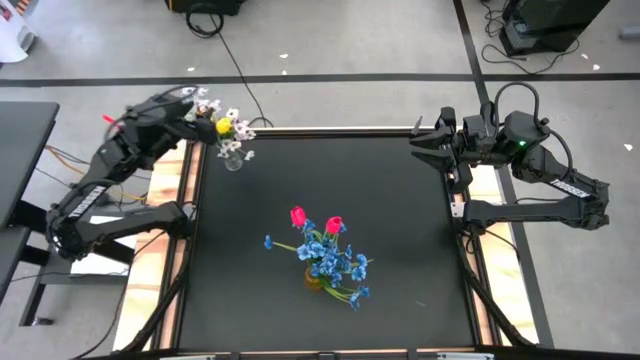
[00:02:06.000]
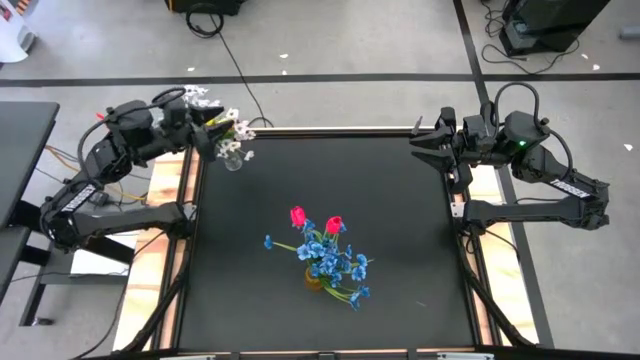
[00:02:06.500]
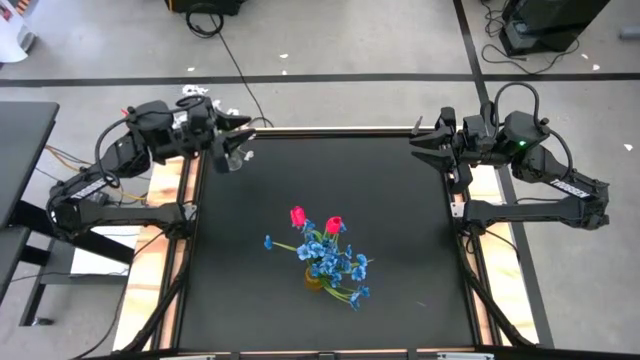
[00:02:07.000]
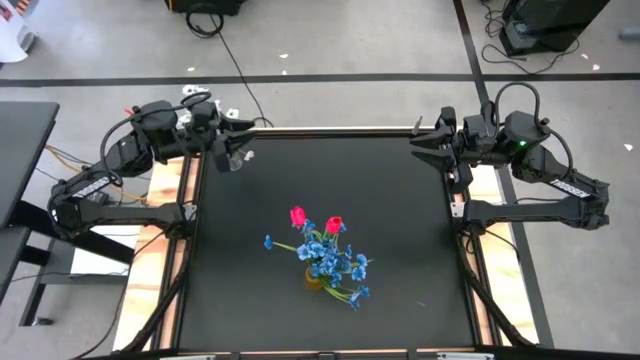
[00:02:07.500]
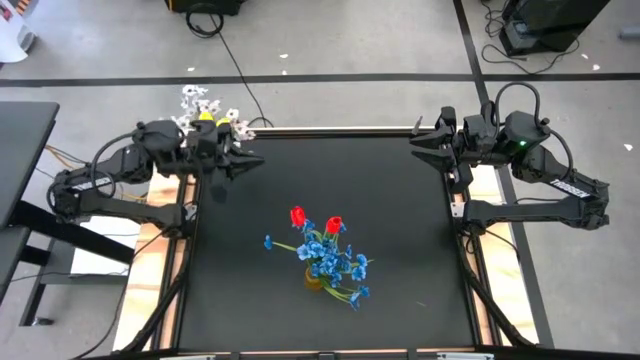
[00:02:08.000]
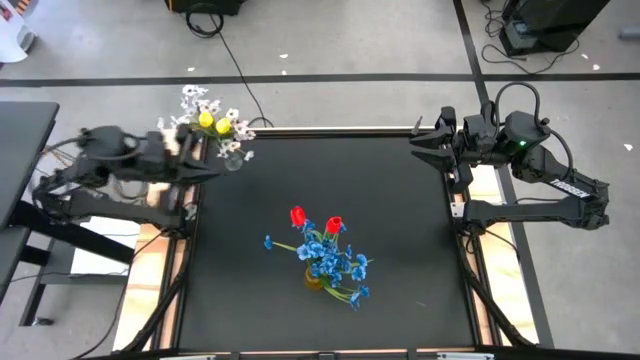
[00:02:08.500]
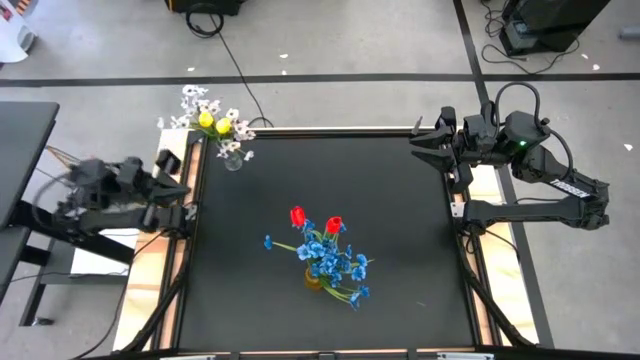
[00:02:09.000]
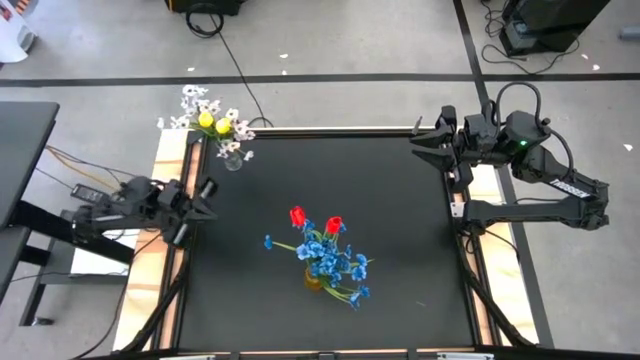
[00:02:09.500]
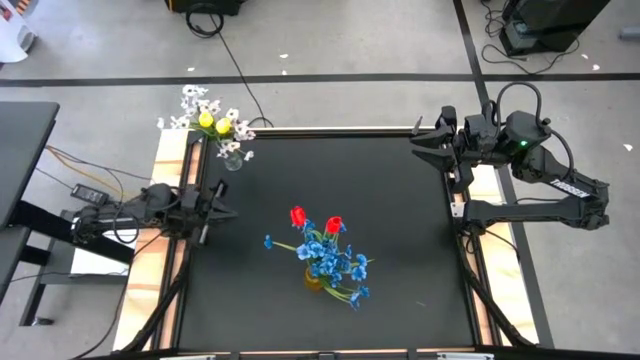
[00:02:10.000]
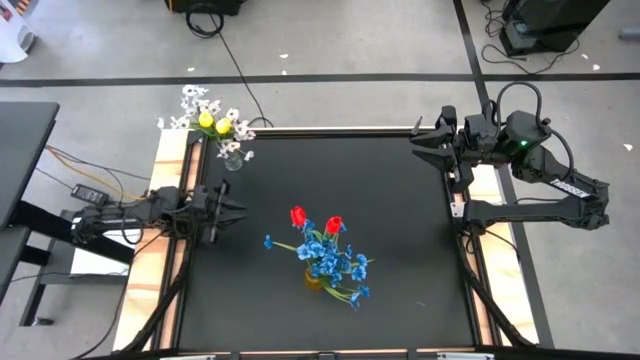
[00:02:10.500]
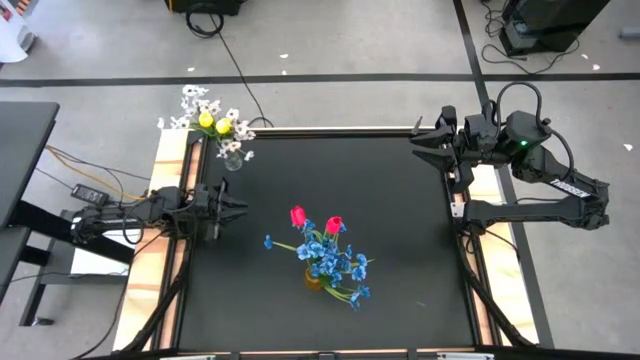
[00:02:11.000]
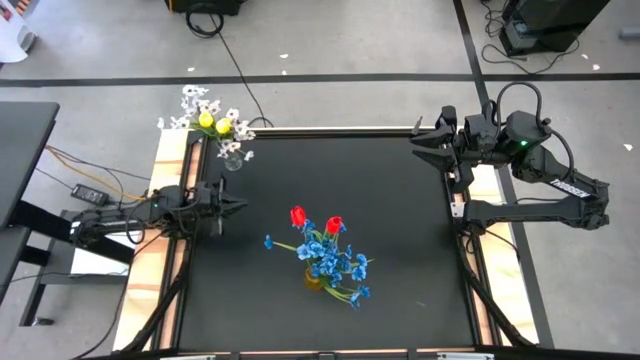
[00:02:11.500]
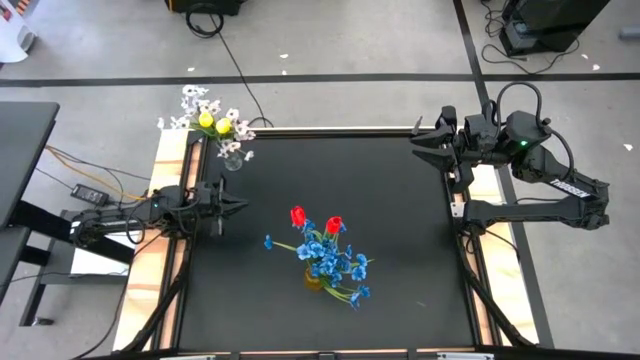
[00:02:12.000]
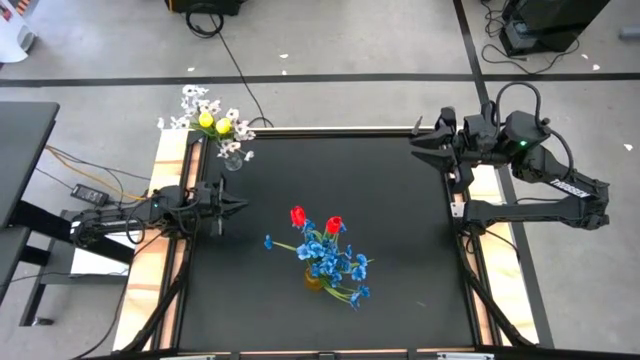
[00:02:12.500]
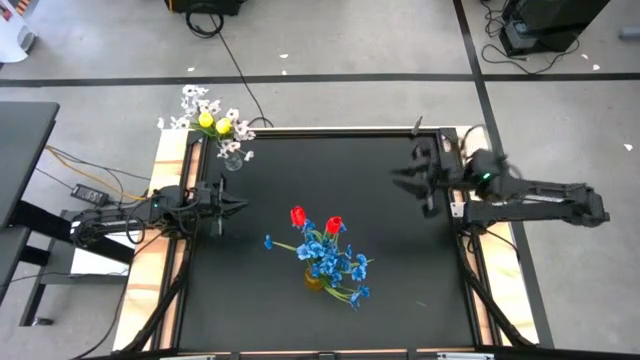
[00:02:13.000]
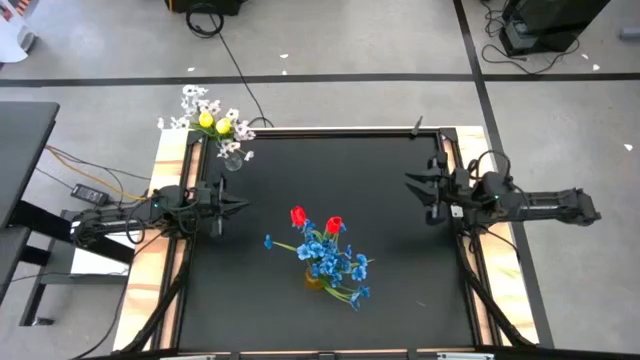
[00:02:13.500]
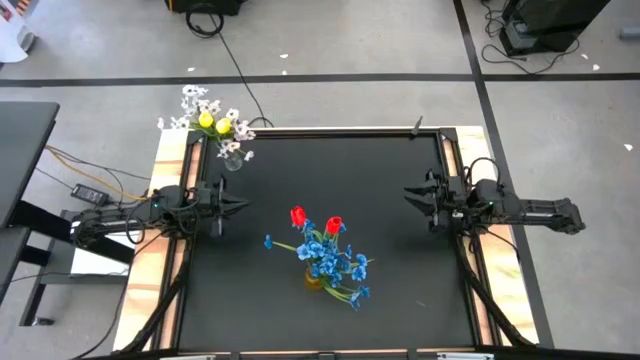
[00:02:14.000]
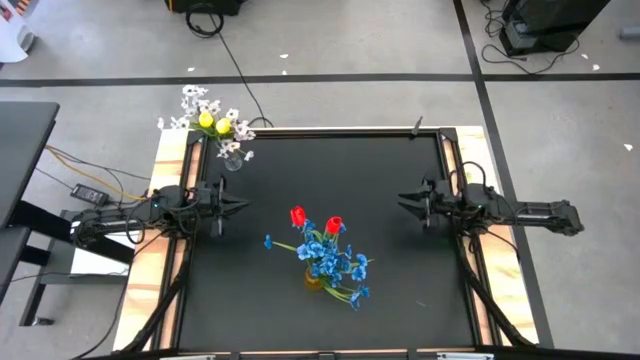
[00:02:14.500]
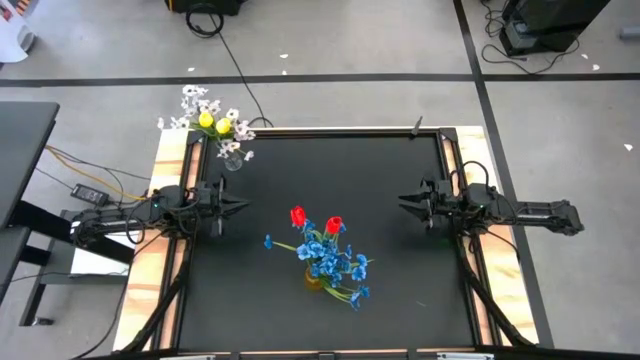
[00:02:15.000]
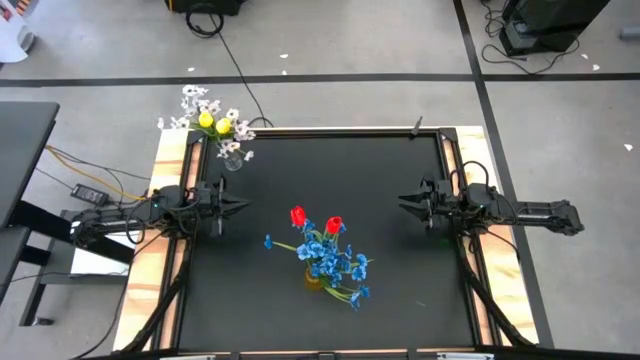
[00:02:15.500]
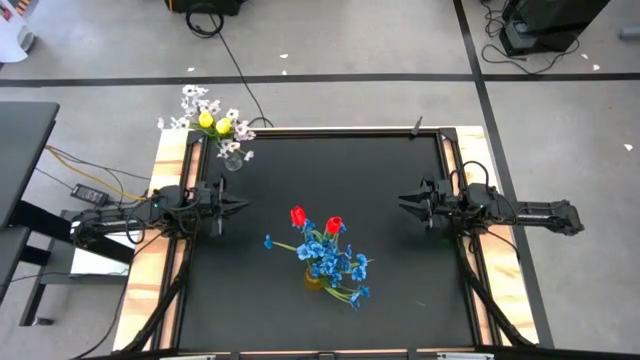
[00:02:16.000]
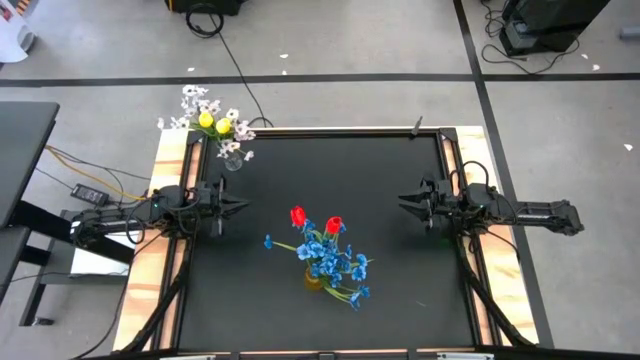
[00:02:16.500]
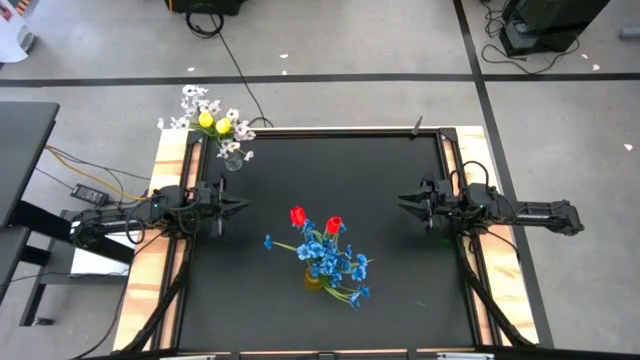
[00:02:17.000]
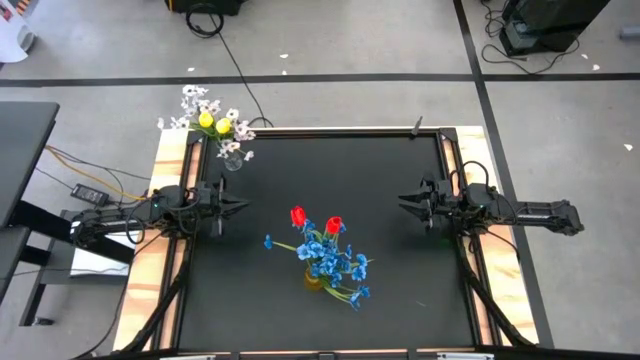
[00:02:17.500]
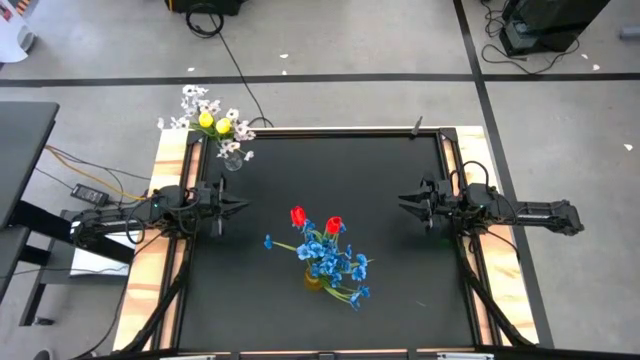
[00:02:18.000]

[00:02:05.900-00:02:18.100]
Task: Sort flowers into vase by color
Return to Home Position

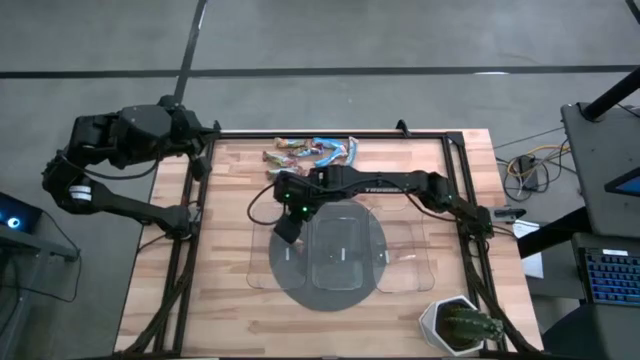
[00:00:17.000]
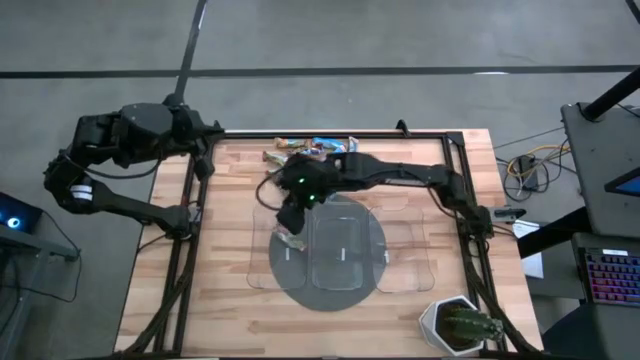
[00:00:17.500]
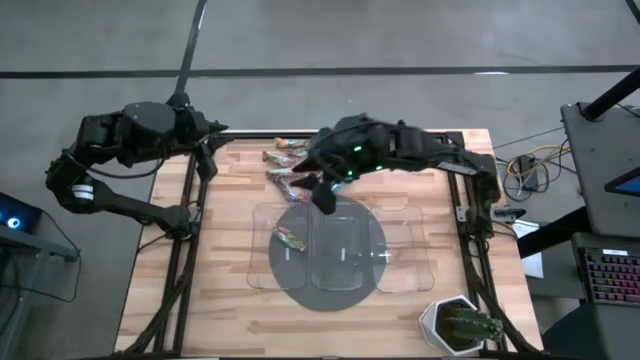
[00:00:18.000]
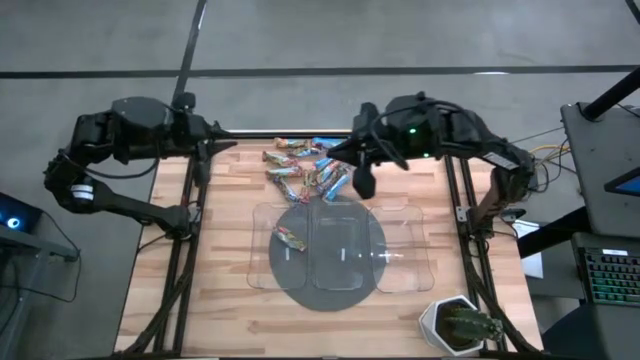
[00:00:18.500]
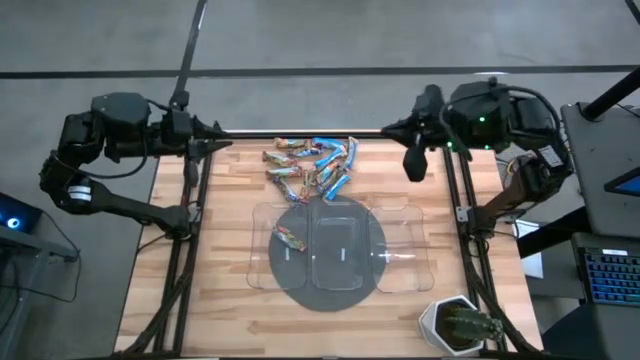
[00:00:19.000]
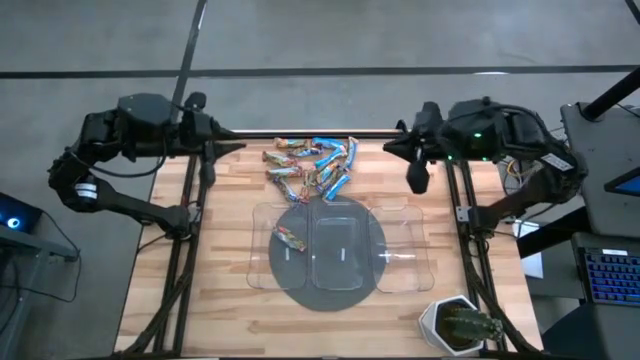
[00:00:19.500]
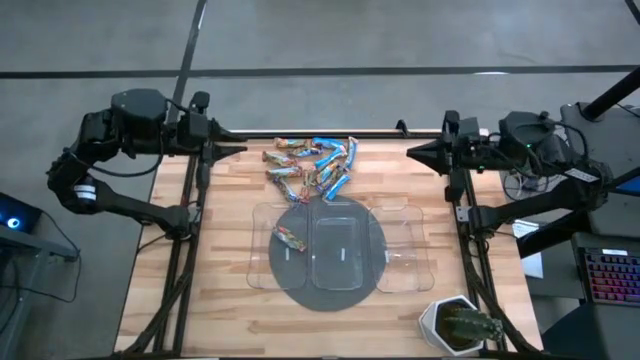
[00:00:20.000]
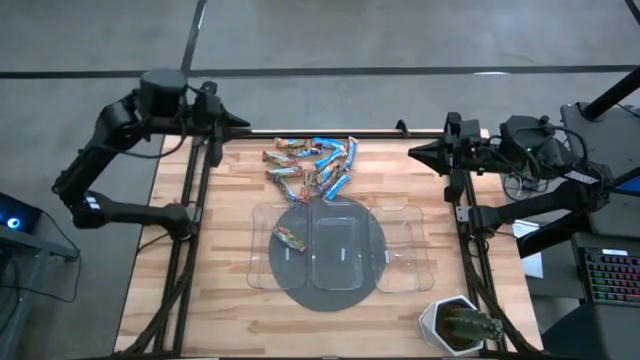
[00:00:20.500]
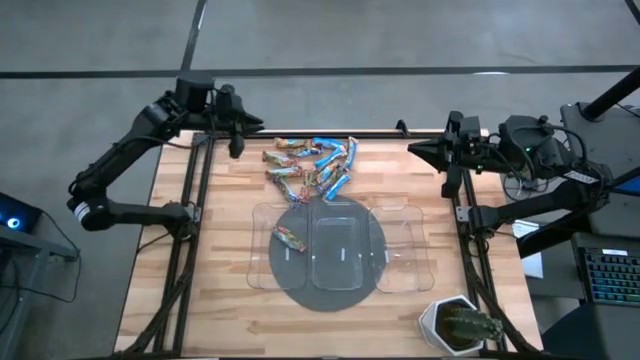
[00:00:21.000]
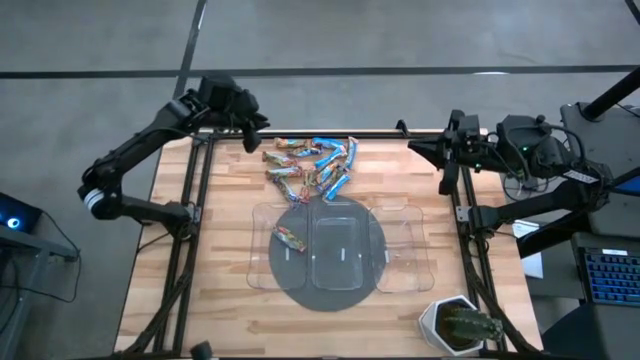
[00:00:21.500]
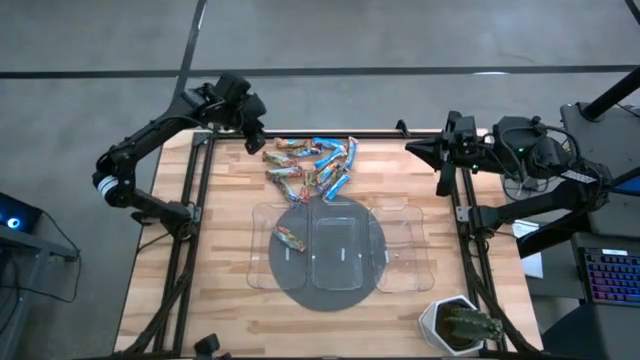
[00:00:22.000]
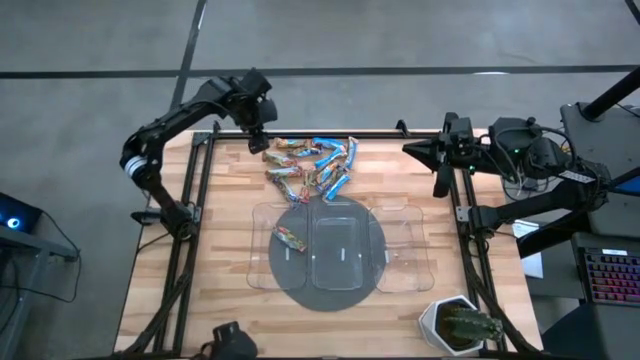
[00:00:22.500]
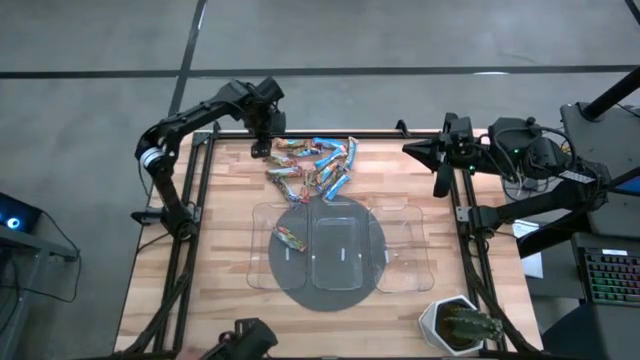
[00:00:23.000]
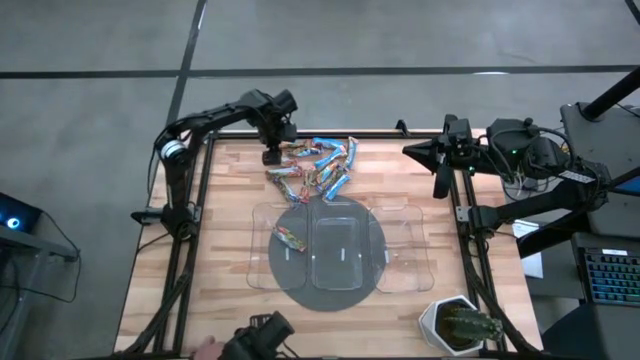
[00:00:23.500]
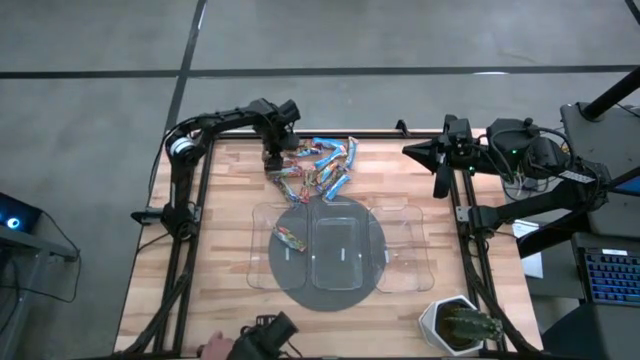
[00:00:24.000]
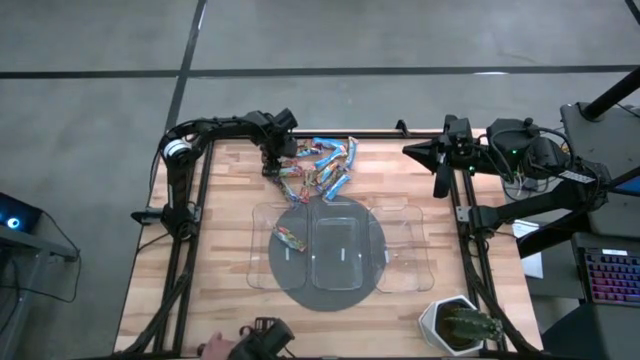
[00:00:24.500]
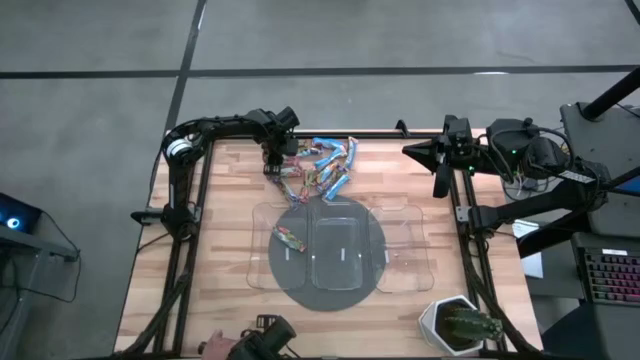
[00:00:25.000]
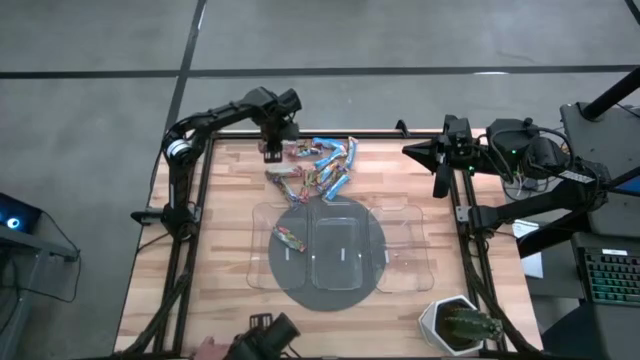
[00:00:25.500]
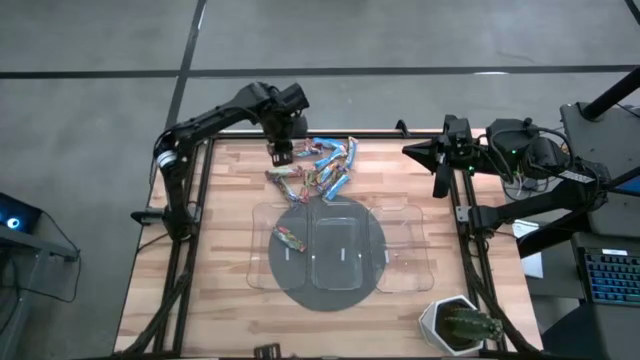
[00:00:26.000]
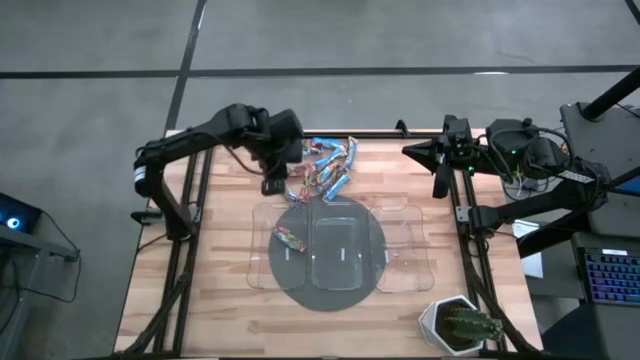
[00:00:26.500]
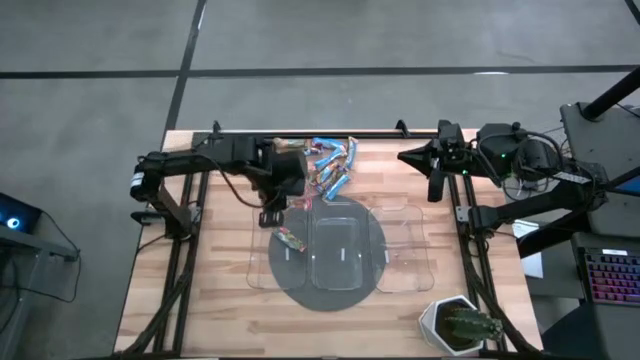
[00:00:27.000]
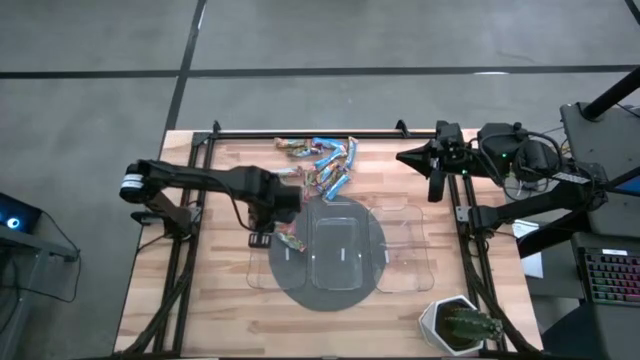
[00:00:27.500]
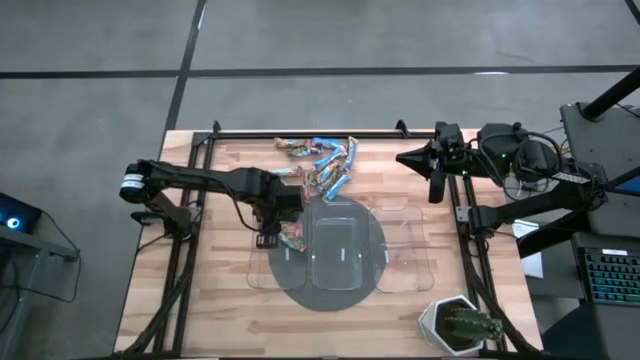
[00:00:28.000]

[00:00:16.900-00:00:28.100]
Task: Pick and place Granola Bars by type
Put the red granola bar into the left transparent bin
